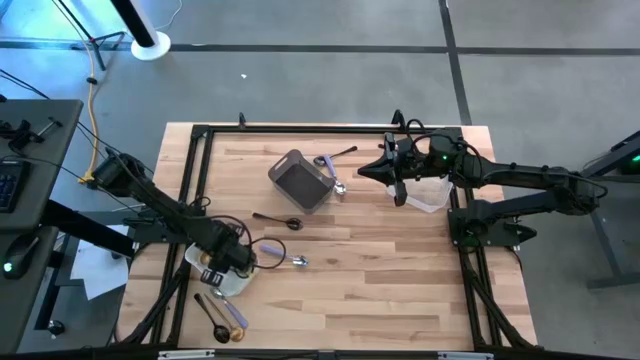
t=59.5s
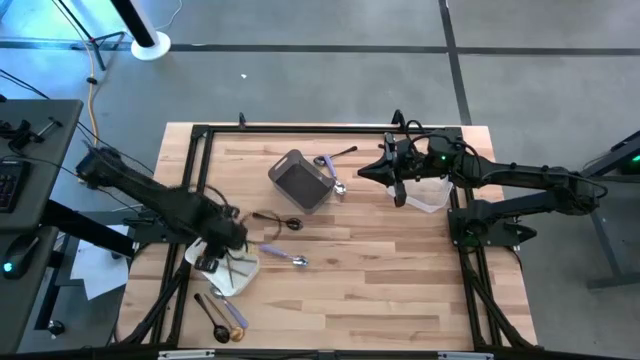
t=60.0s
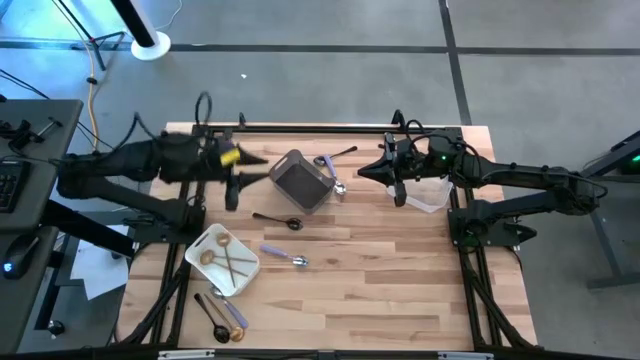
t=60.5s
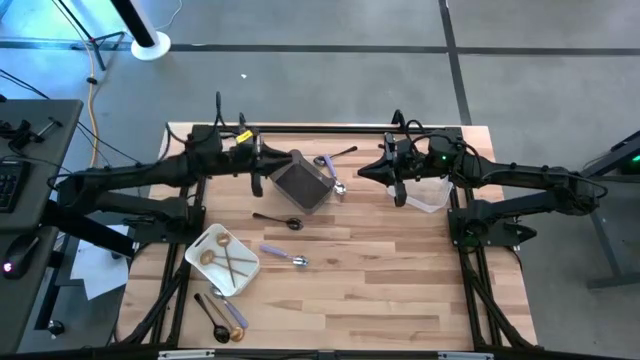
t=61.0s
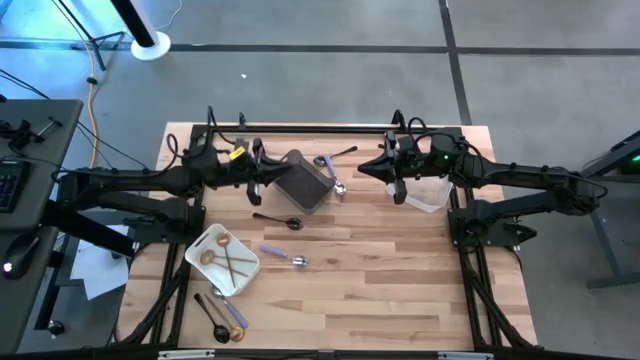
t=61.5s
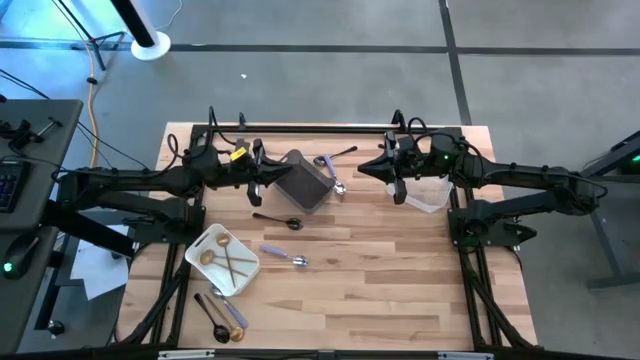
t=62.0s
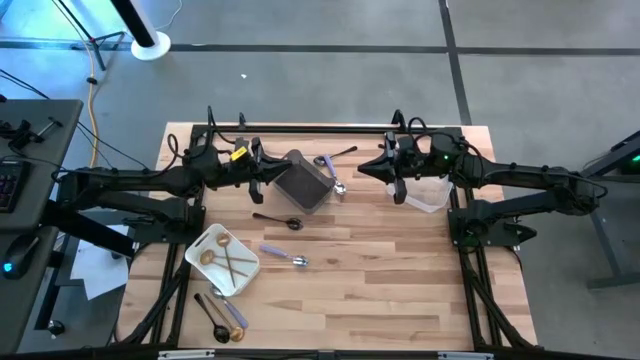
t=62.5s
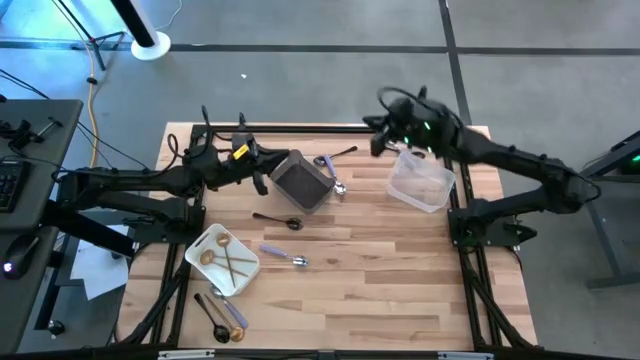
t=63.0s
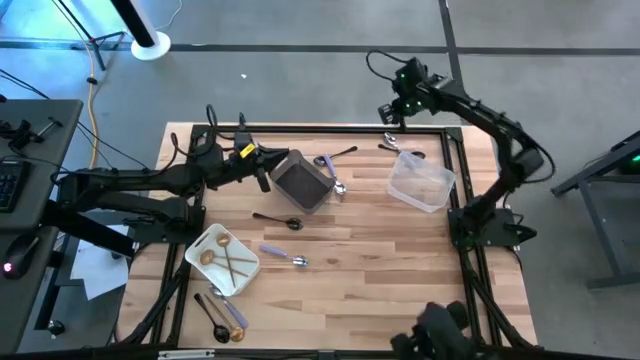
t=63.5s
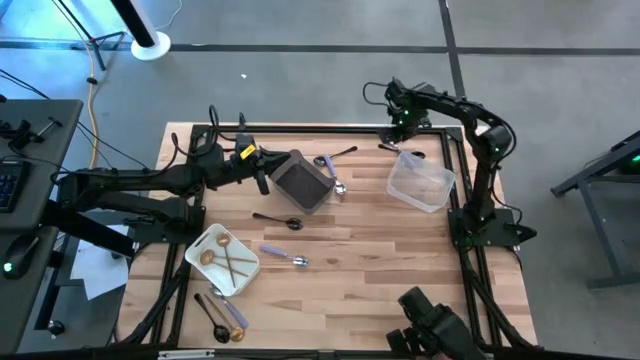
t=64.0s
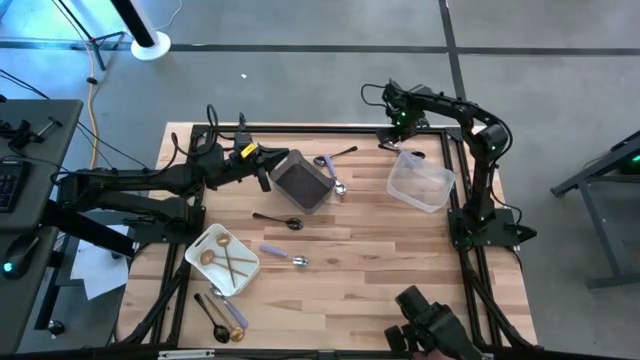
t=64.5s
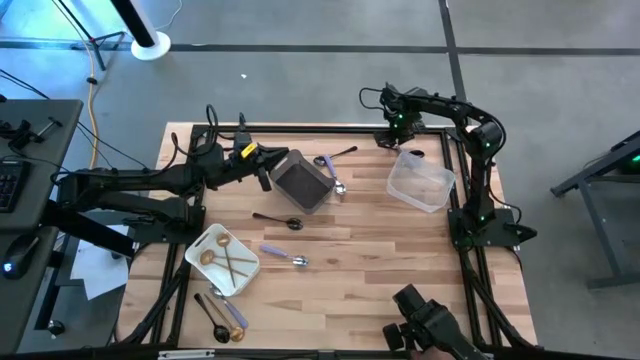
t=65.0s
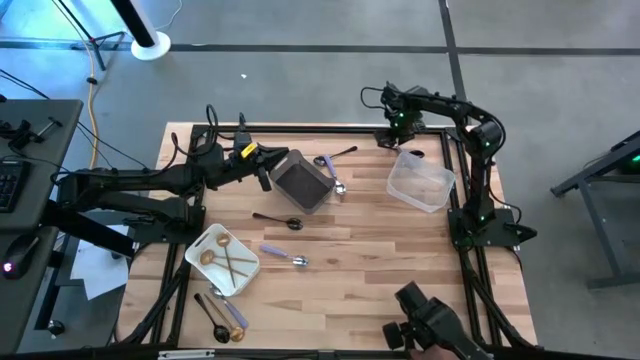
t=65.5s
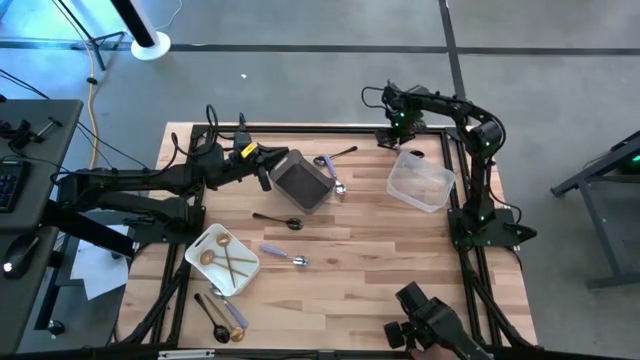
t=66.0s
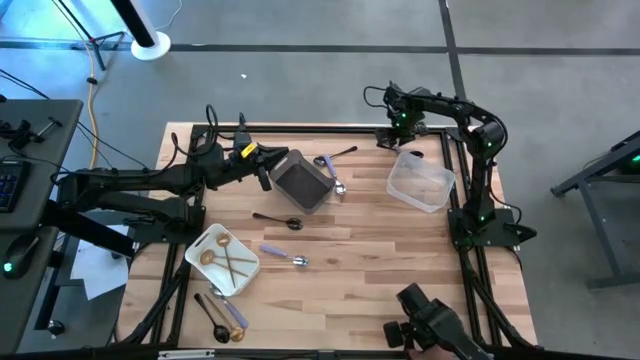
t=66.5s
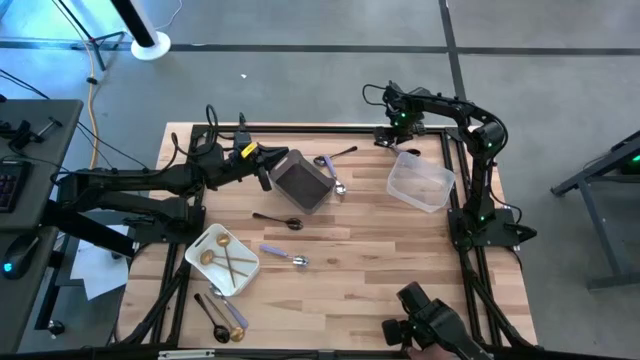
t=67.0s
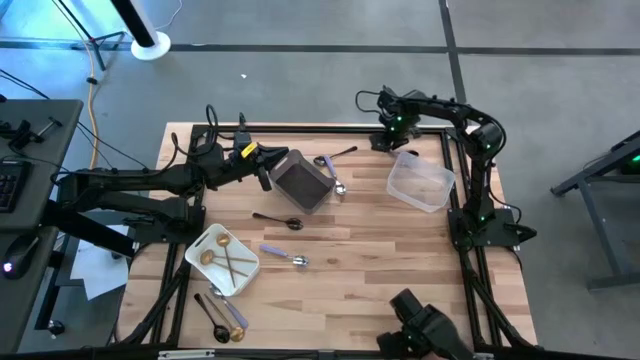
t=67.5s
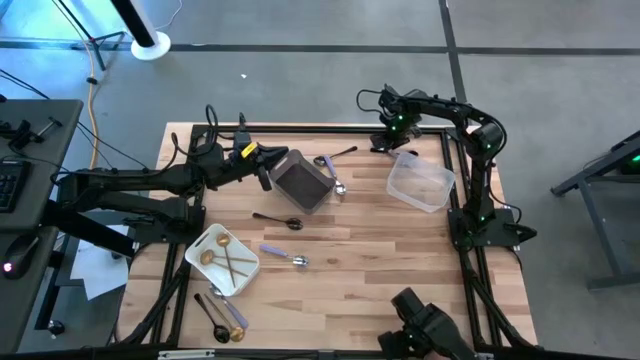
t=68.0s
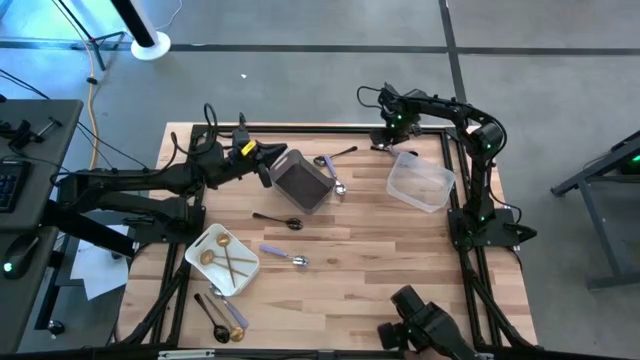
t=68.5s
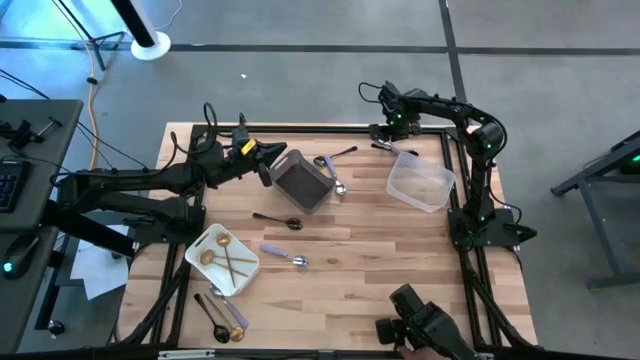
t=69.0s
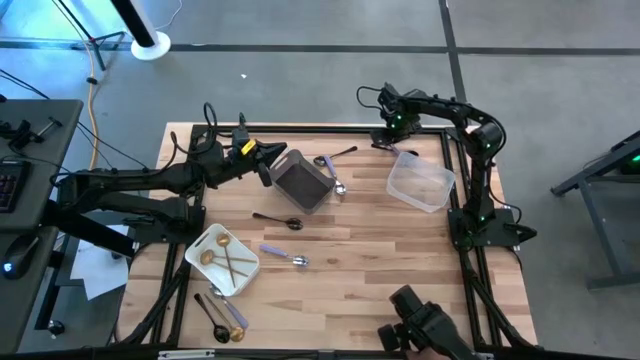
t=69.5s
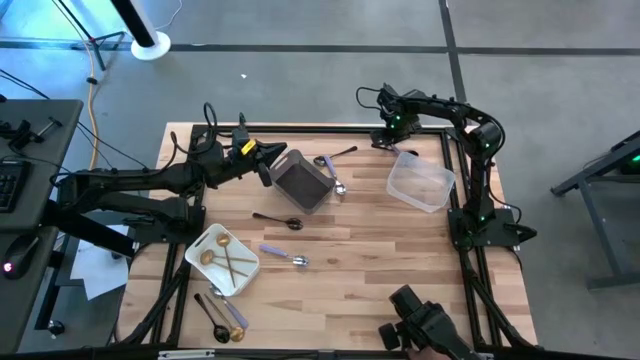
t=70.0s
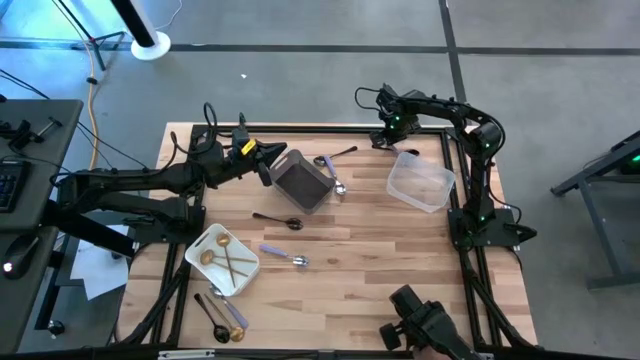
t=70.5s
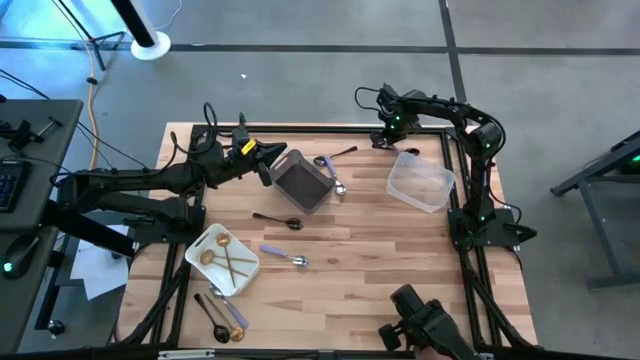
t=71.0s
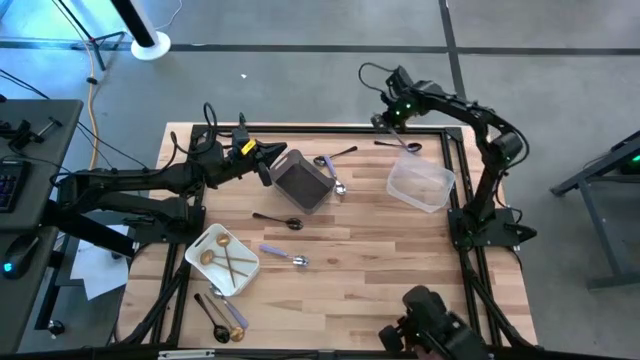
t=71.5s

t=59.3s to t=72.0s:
Task: Sort silverware by color (type)
Put the top right purple spoon into the black bin

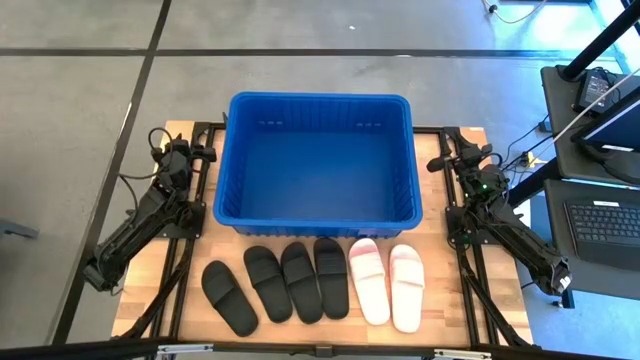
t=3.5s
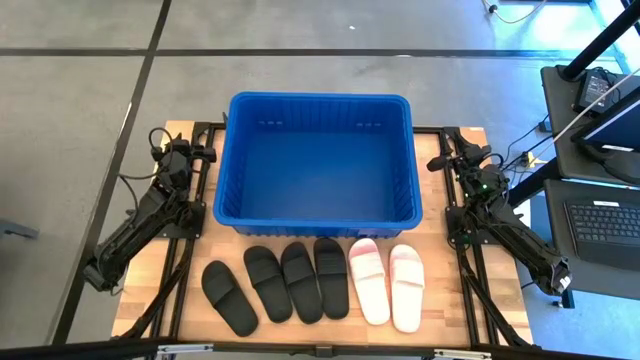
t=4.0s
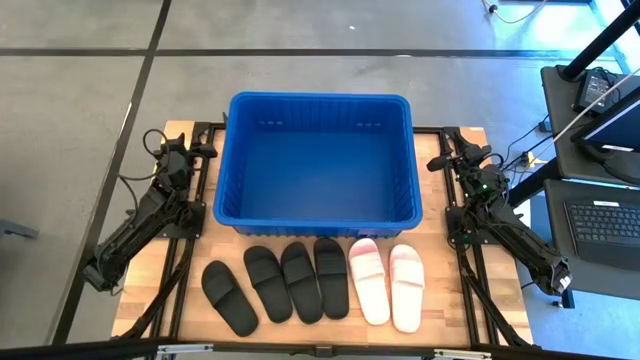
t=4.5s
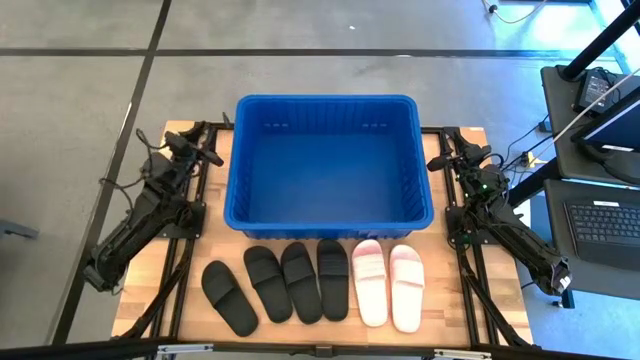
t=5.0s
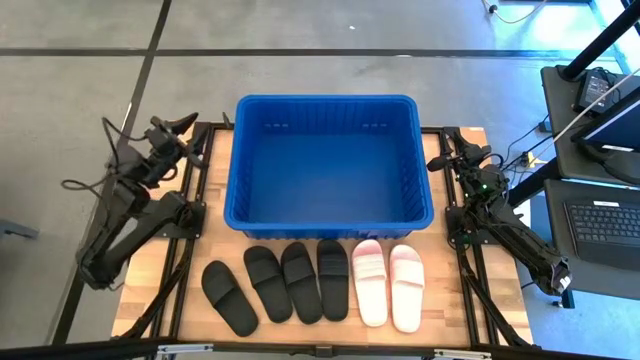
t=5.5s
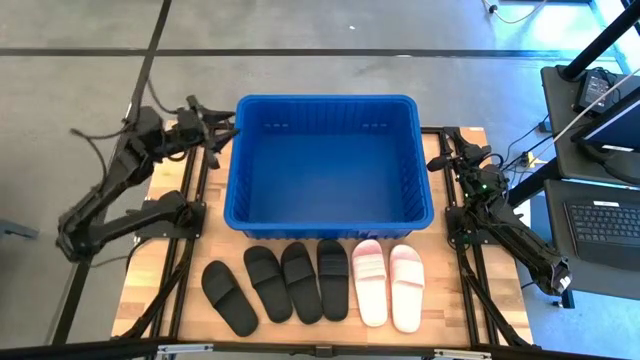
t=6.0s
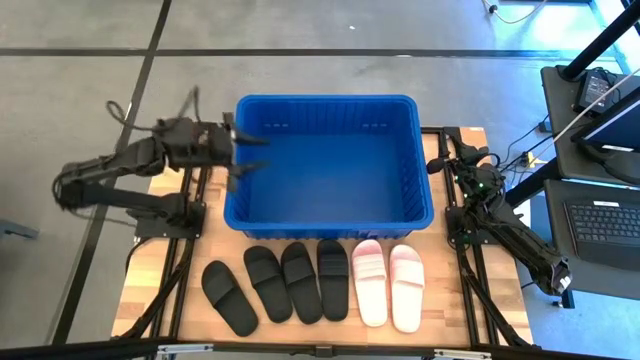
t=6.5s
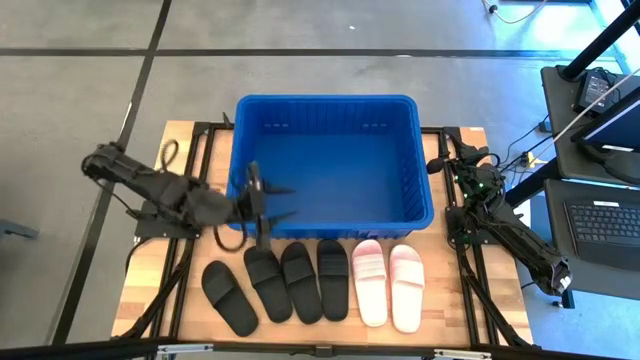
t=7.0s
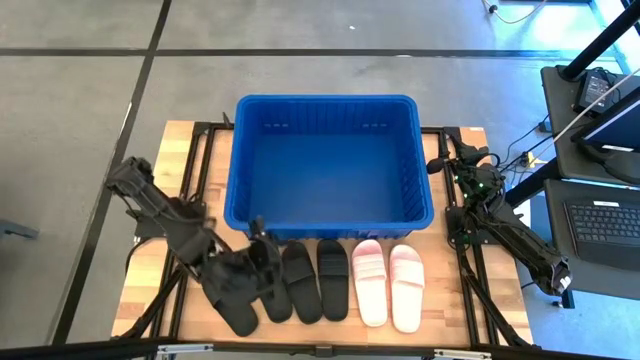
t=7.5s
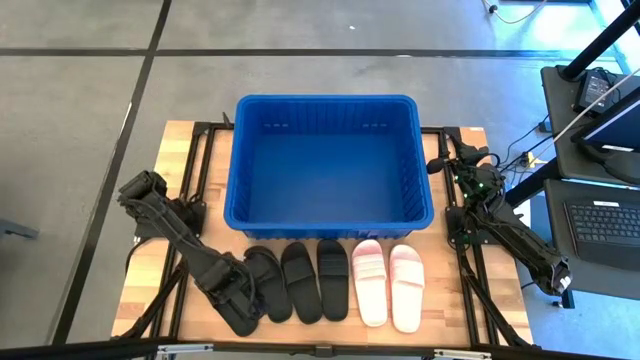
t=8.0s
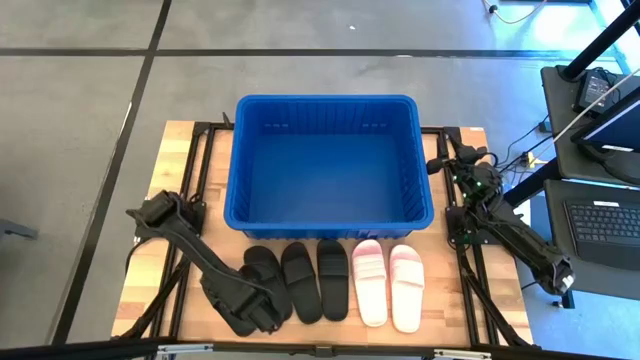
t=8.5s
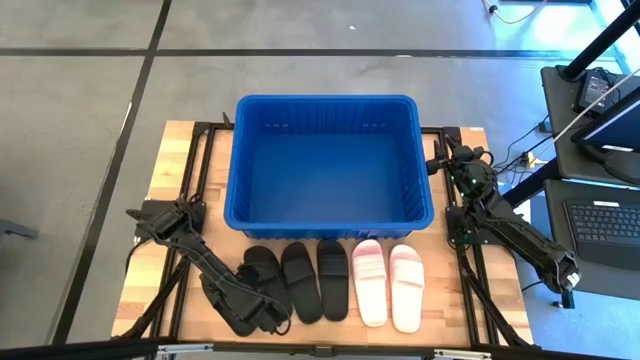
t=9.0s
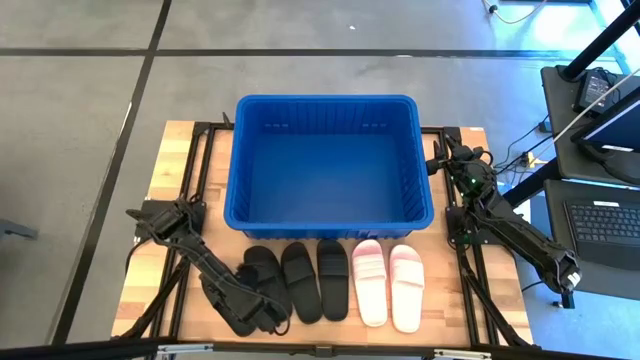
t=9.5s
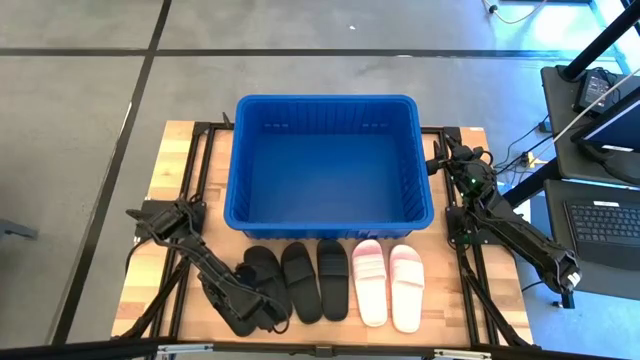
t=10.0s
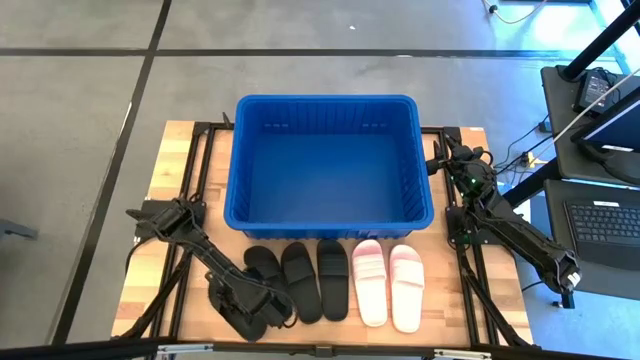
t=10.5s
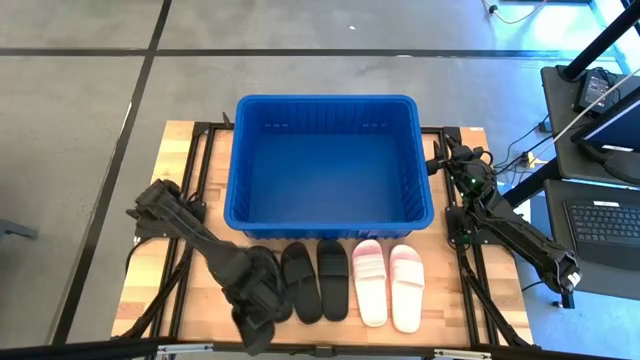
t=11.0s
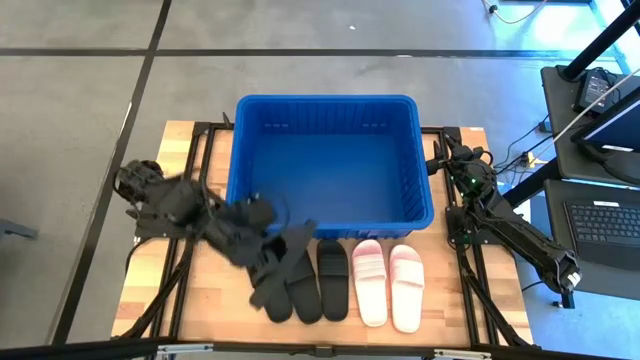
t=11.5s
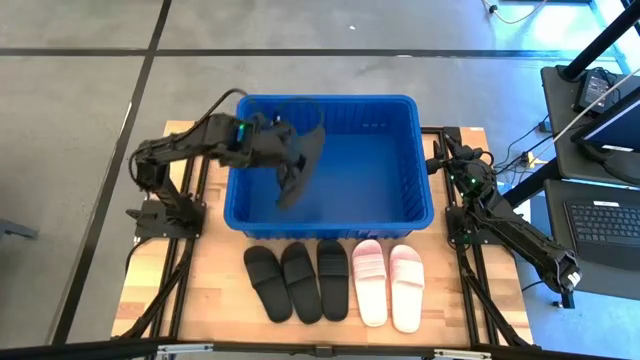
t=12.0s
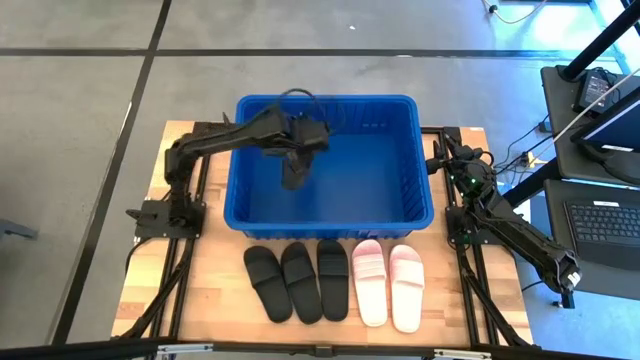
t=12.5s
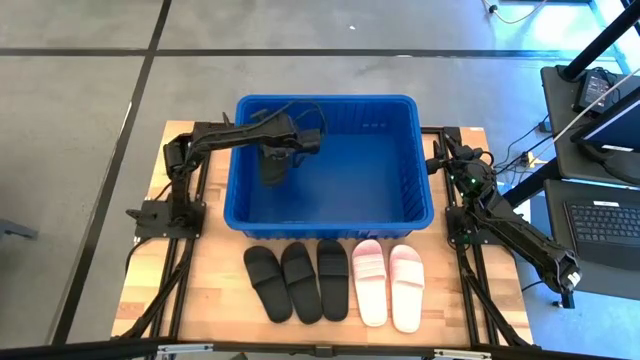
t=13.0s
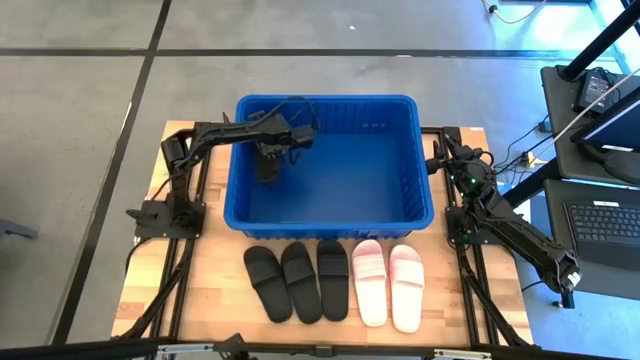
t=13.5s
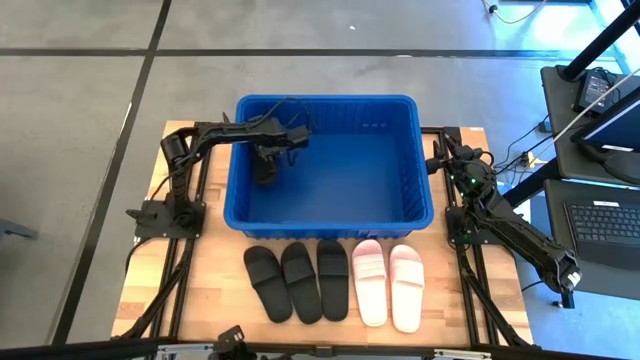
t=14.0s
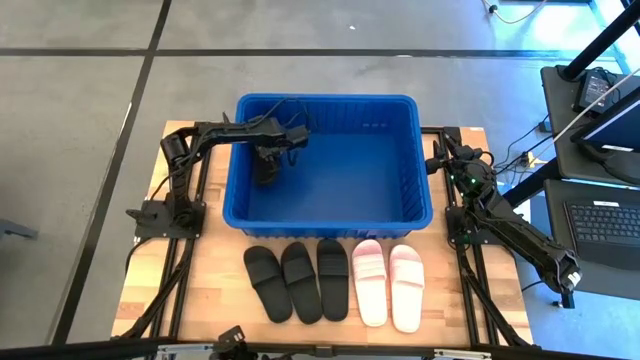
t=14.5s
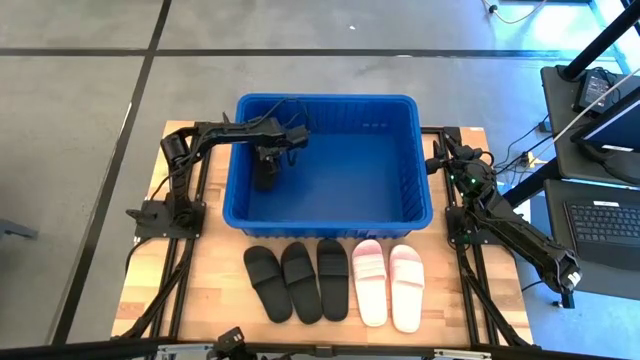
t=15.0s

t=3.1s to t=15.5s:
Task: Pick and place slides into bin
Put the black slide into the blue bin
